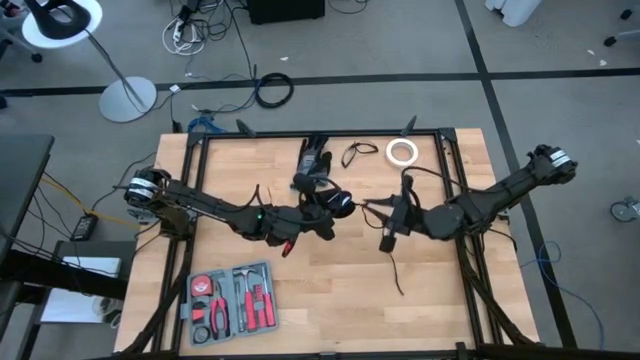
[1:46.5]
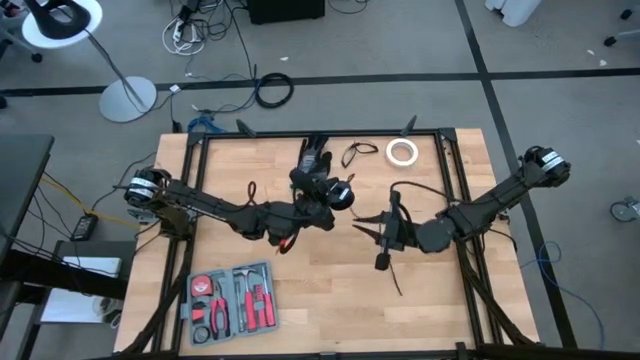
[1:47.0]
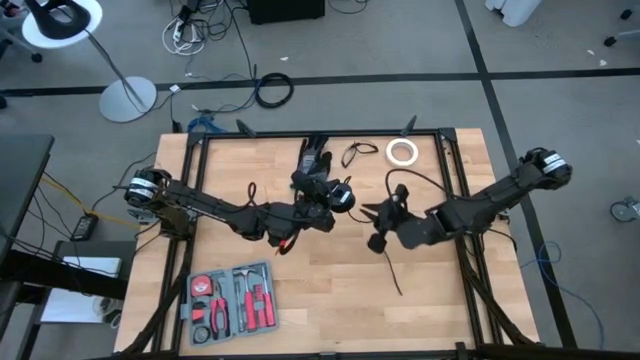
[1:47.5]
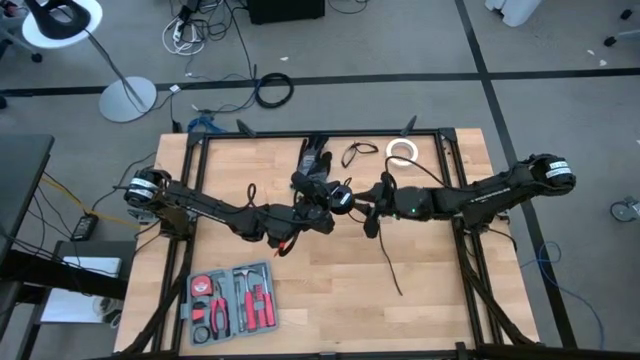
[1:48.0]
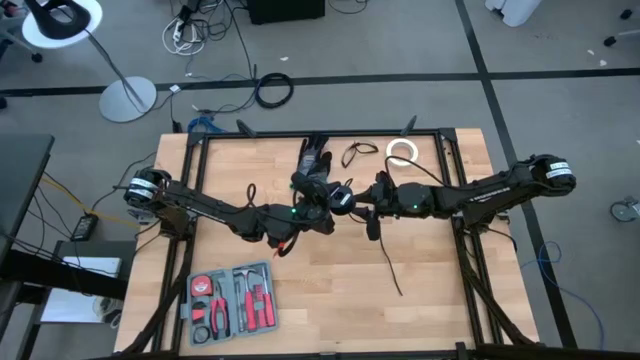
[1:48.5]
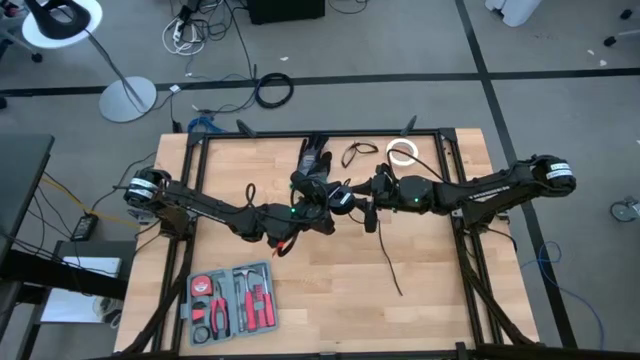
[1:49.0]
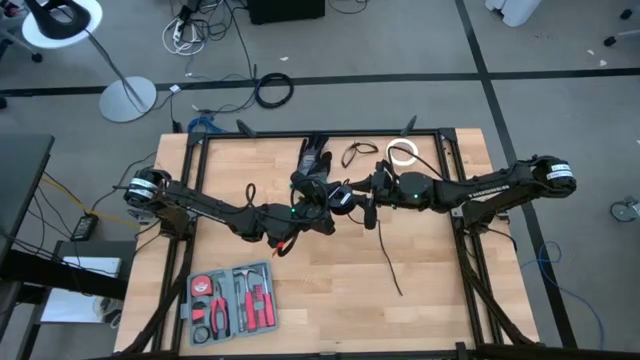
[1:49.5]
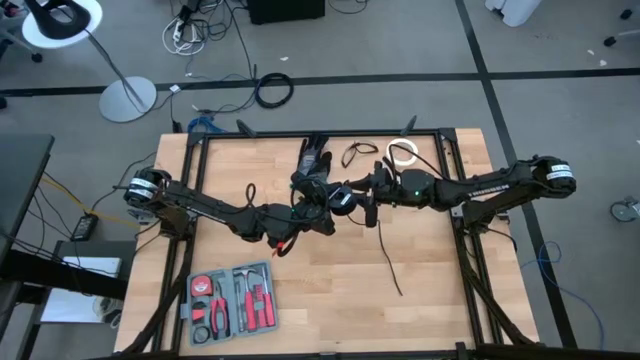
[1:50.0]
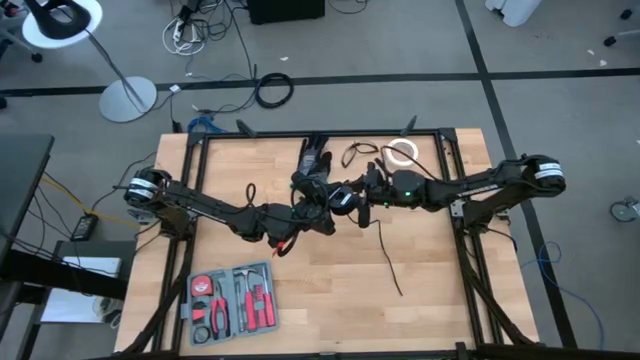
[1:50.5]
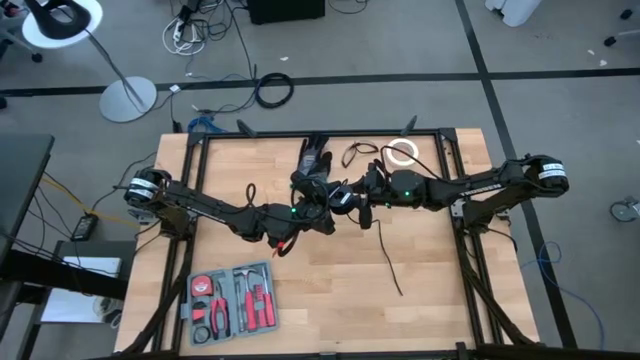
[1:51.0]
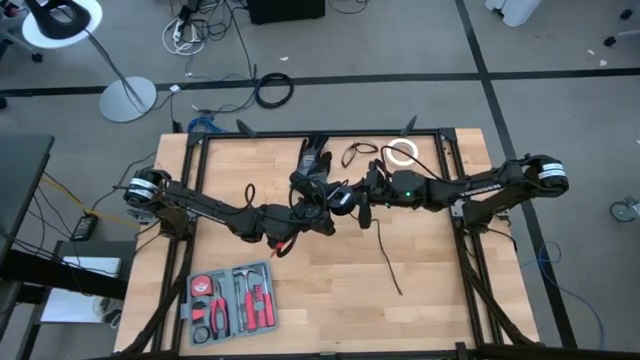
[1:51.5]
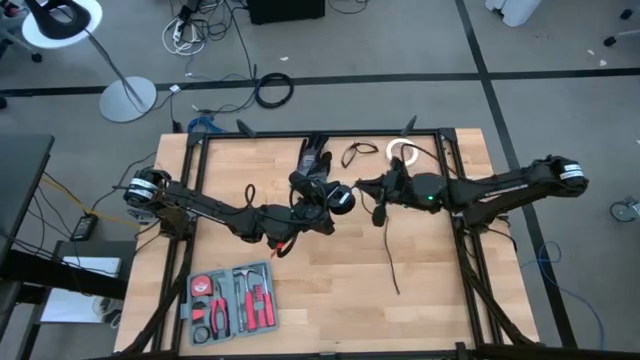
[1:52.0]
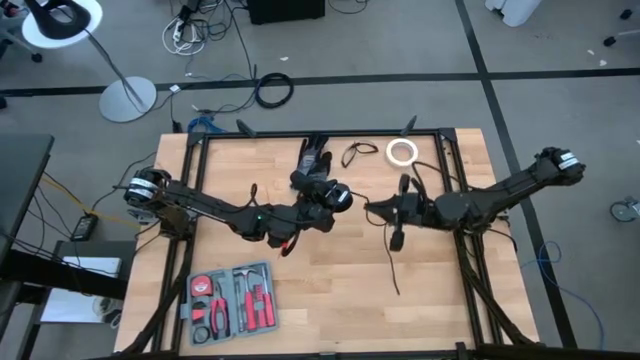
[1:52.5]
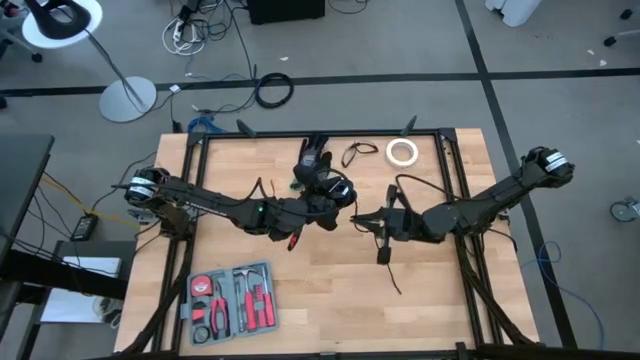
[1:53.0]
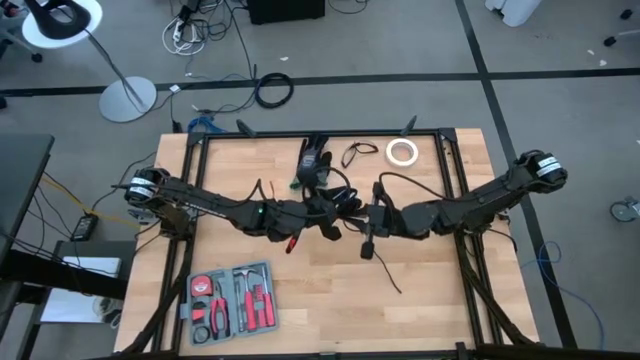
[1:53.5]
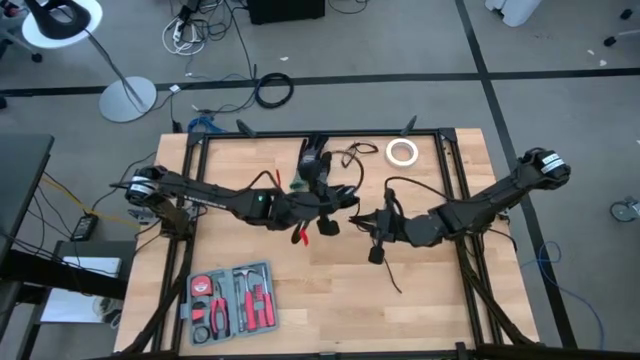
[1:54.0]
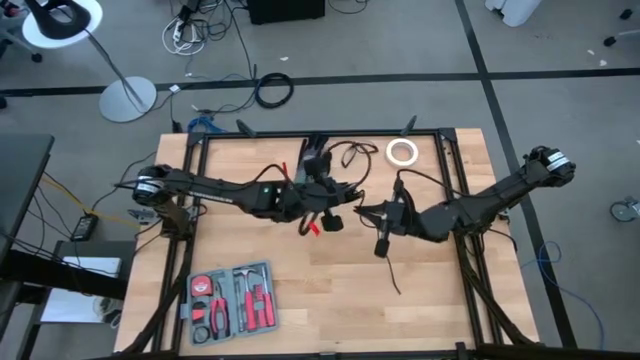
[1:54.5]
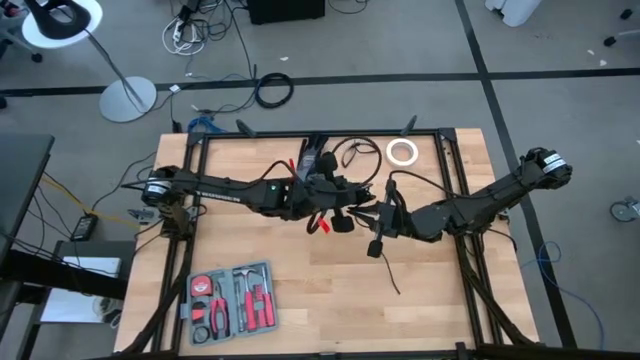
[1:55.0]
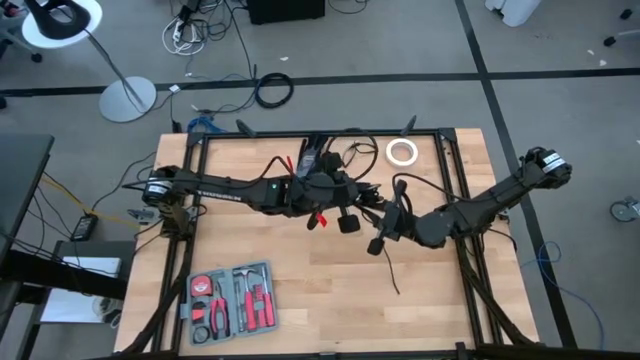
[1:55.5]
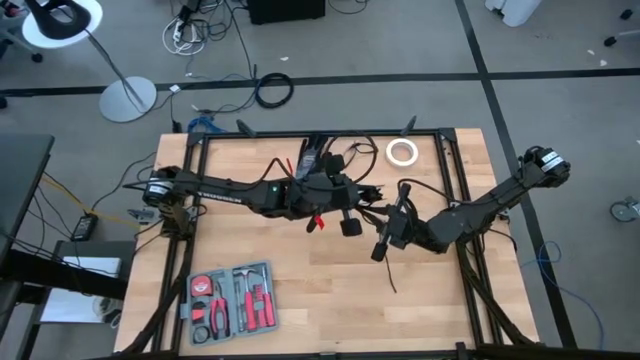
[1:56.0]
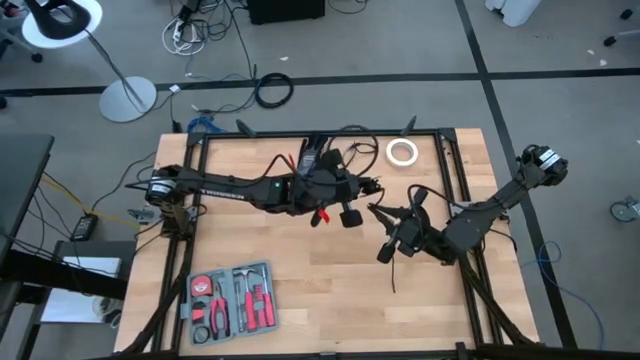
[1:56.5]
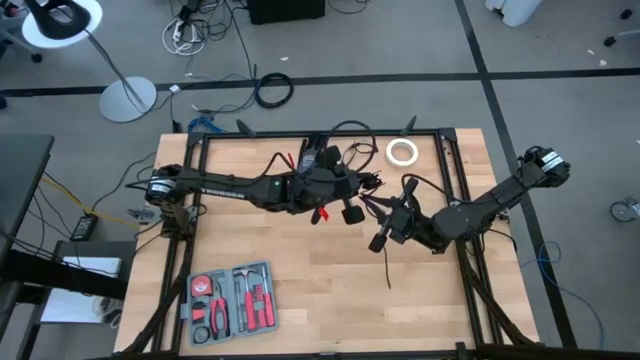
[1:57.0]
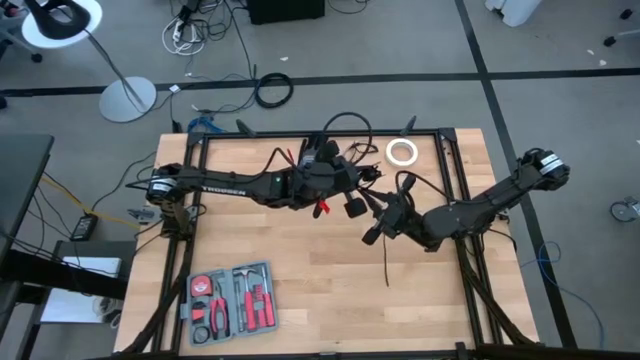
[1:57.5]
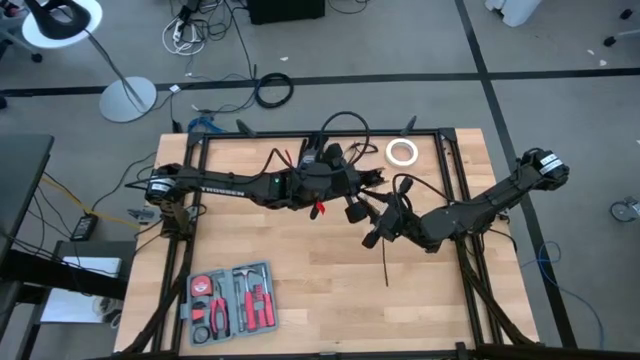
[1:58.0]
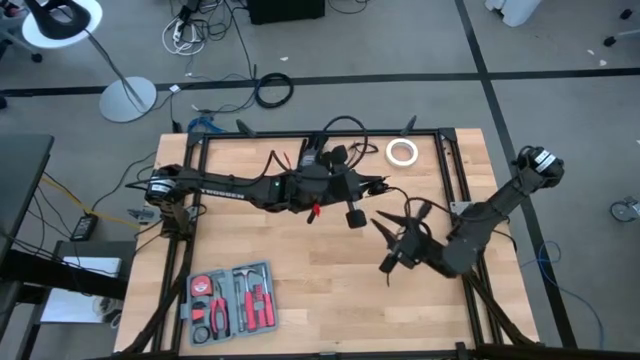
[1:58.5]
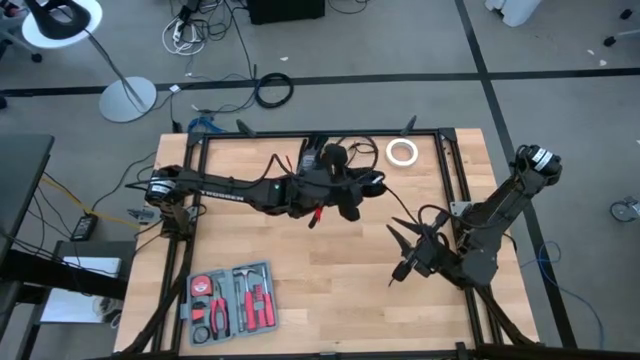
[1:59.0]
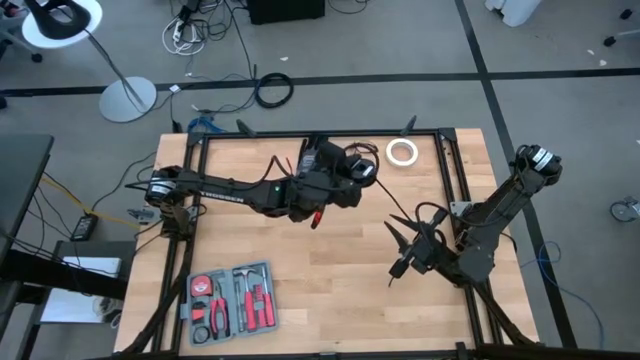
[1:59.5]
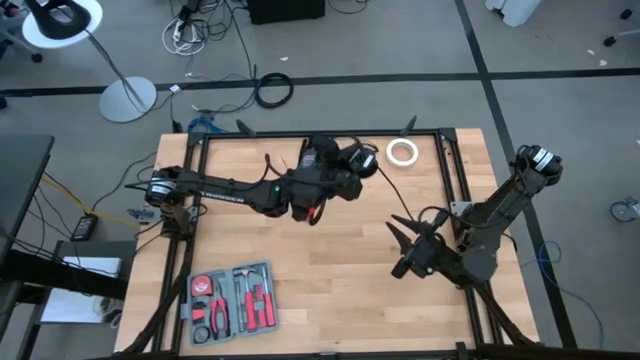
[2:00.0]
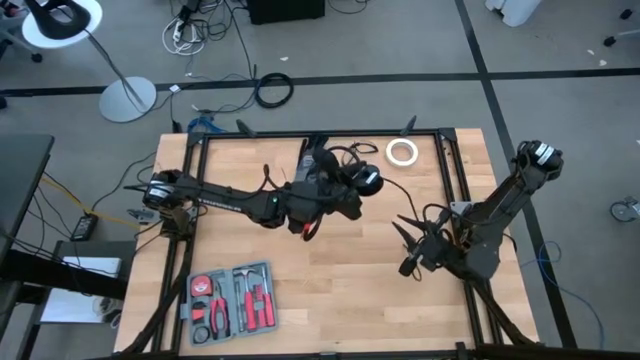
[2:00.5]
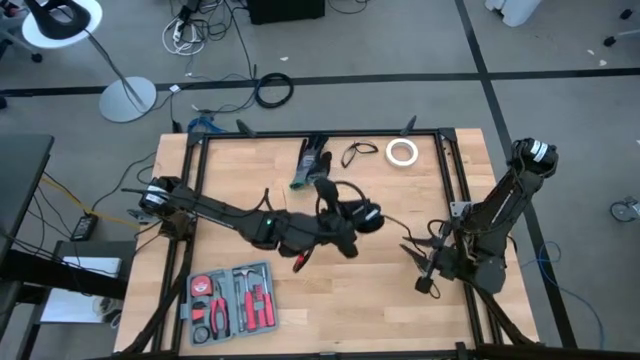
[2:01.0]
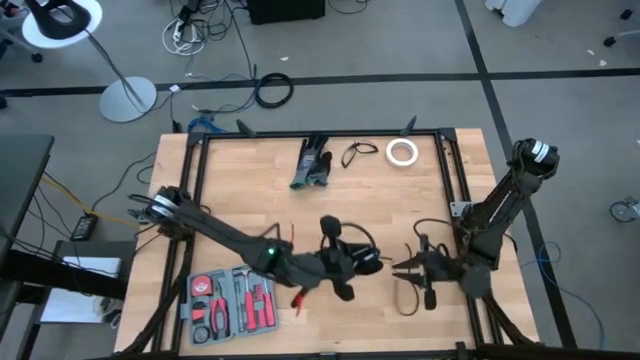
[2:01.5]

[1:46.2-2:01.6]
Task: Coil cords
Coil the black wire into a spool

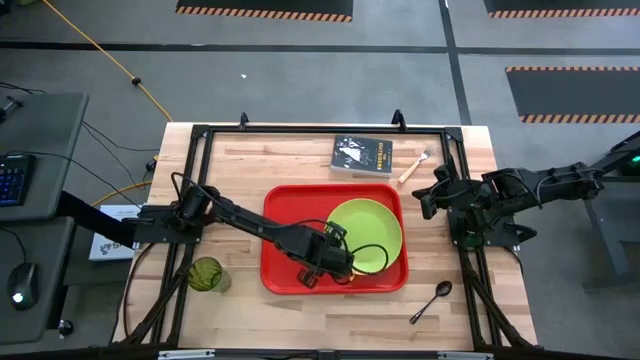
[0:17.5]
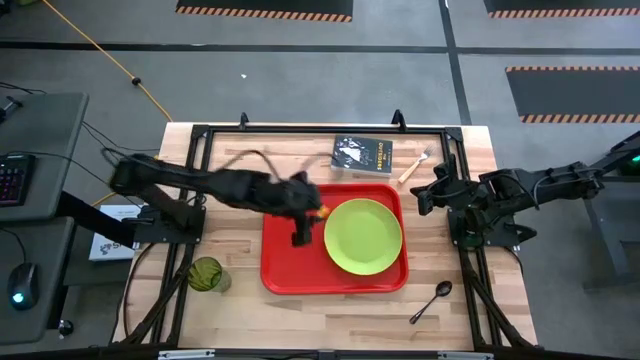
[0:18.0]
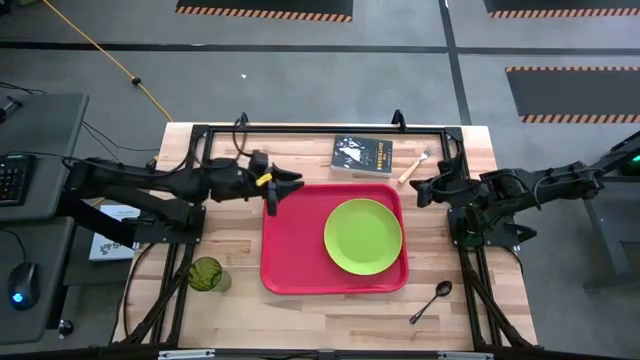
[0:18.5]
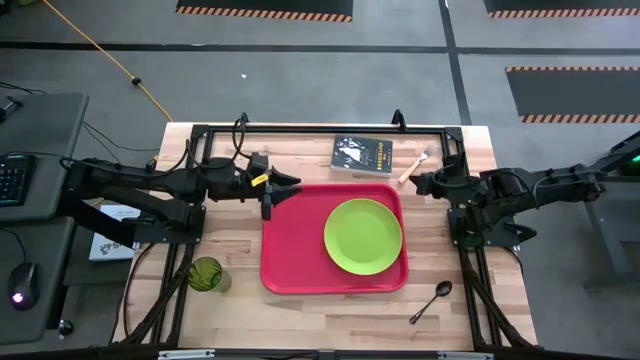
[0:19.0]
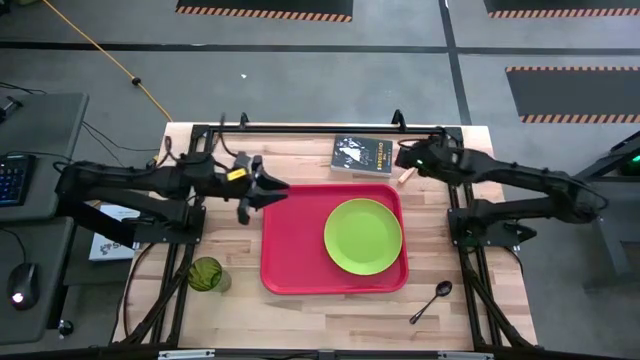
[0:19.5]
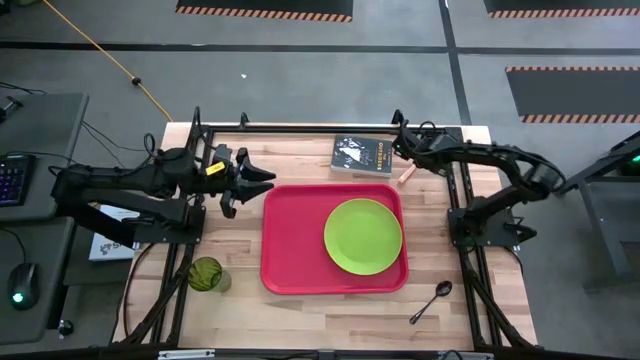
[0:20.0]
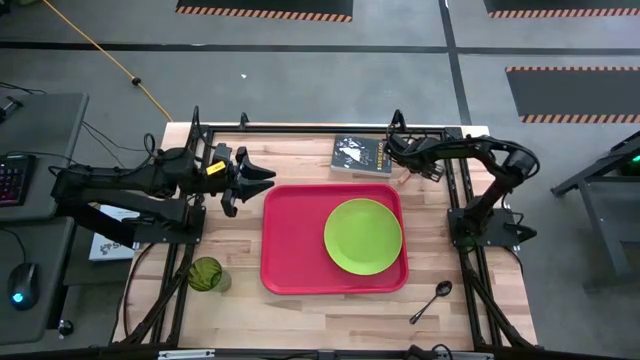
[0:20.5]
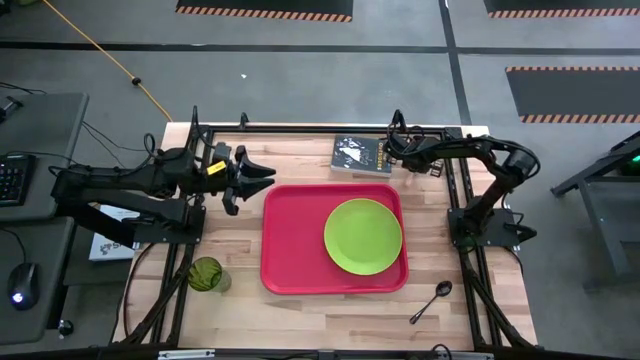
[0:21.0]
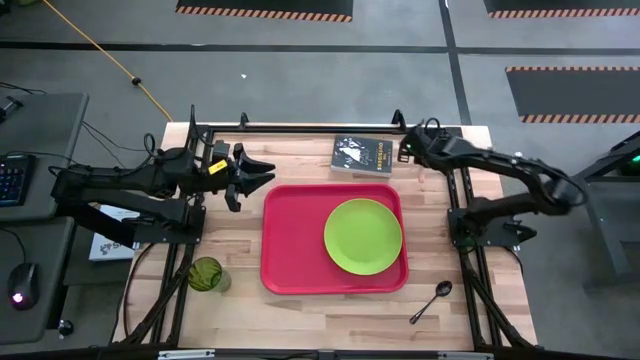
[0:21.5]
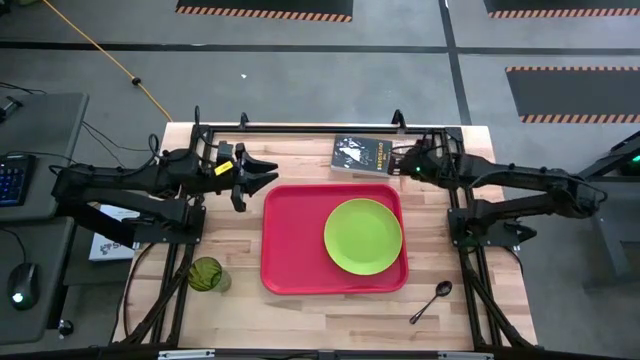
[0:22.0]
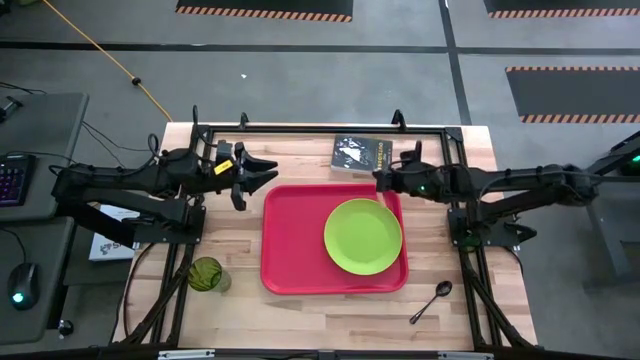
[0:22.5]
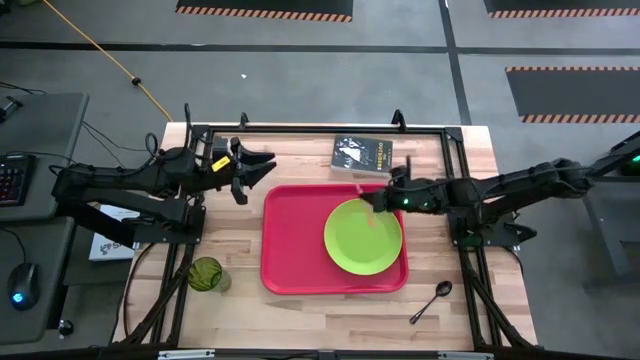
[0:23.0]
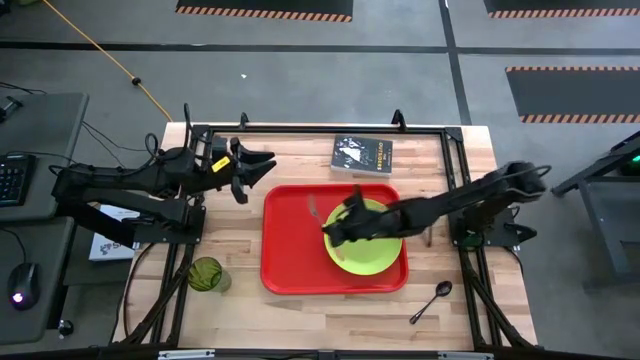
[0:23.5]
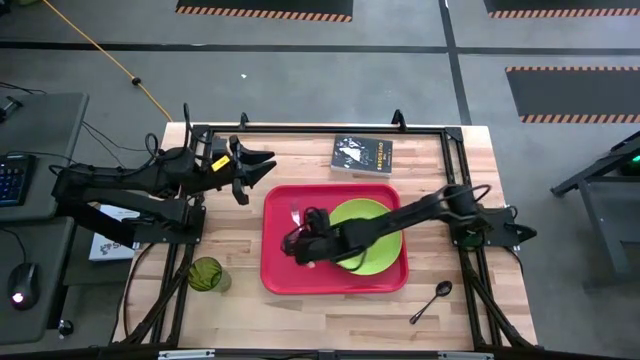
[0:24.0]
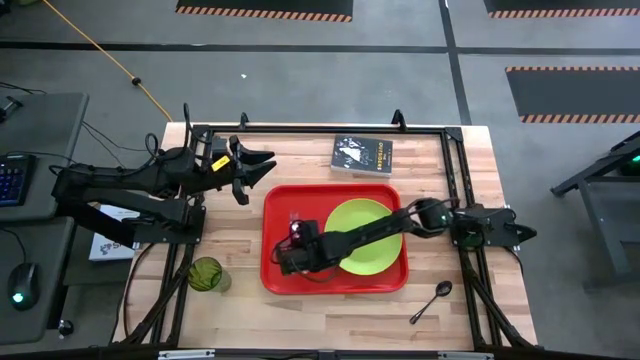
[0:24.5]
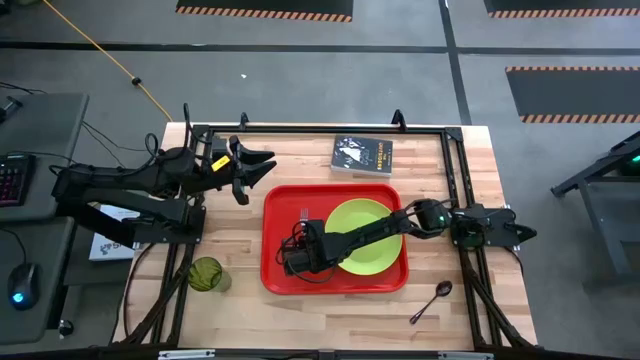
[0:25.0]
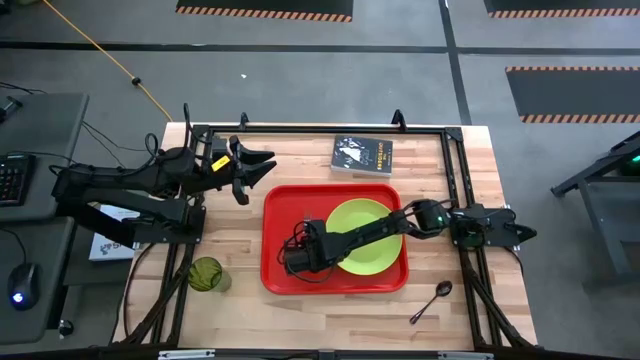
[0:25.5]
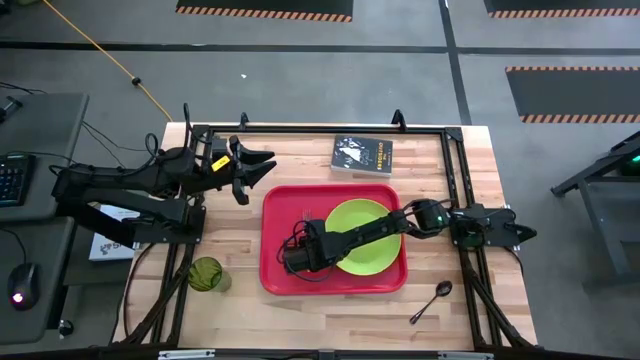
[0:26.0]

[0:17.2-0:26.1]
Task: Pick and place plate/cup/fork/spoon on tray
Put the orange fork on the red serving tray to the left of the green plate
